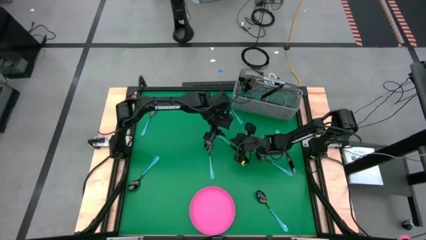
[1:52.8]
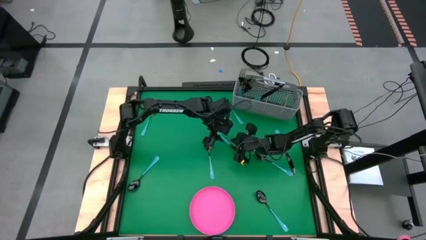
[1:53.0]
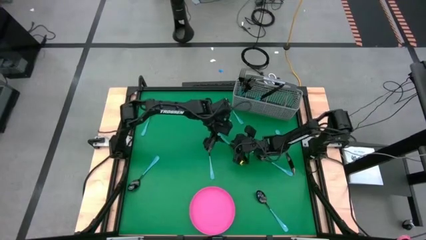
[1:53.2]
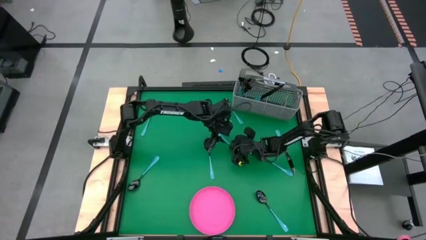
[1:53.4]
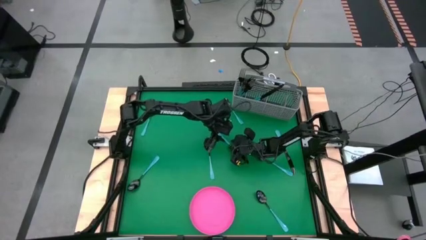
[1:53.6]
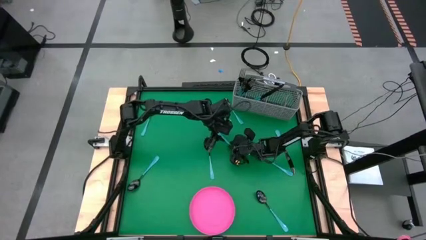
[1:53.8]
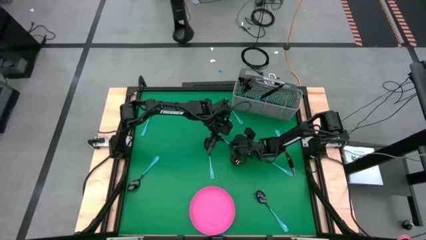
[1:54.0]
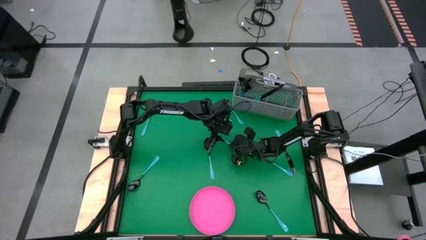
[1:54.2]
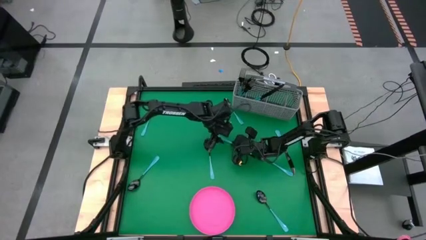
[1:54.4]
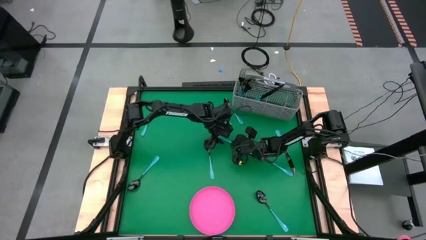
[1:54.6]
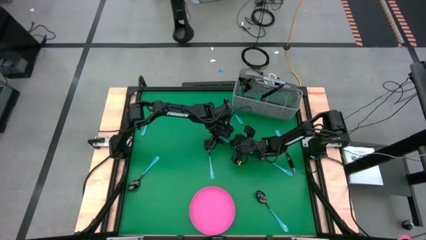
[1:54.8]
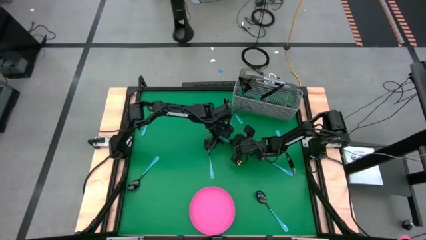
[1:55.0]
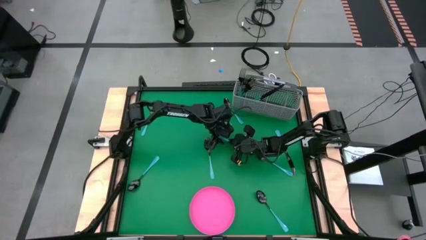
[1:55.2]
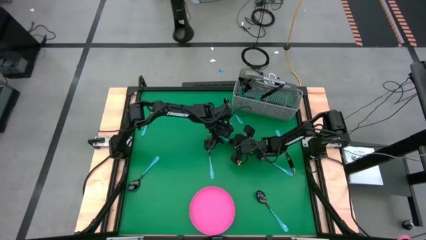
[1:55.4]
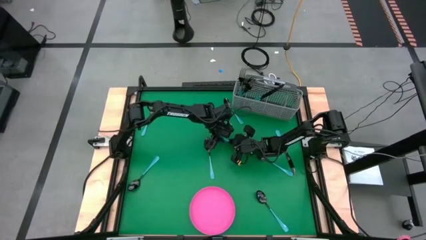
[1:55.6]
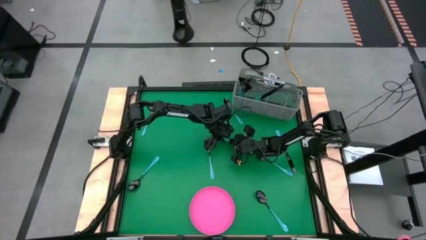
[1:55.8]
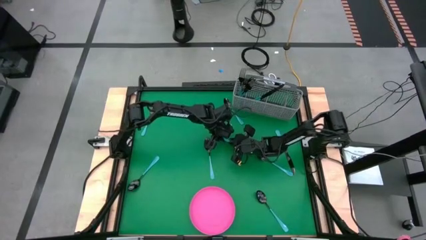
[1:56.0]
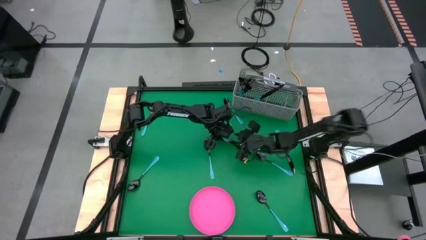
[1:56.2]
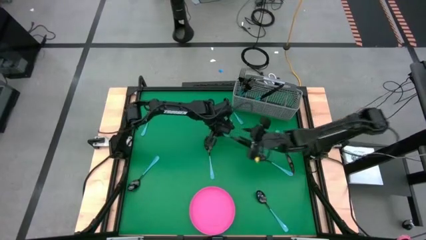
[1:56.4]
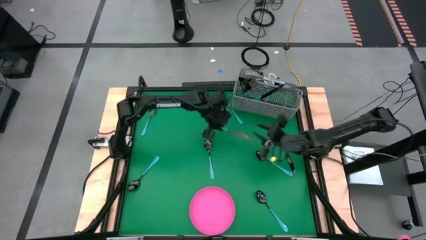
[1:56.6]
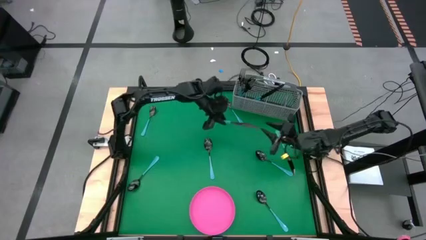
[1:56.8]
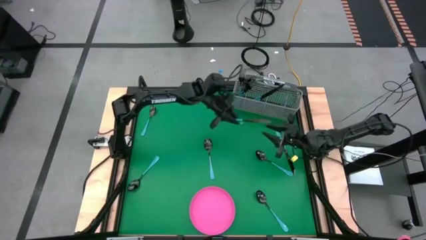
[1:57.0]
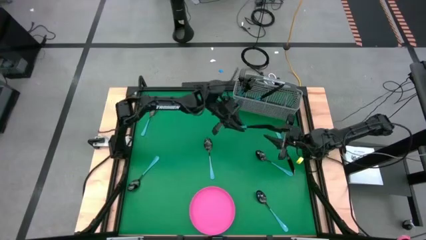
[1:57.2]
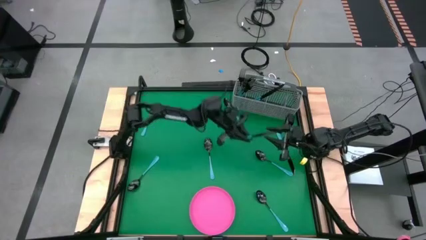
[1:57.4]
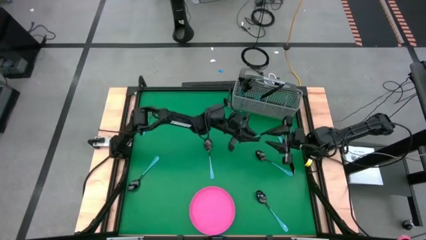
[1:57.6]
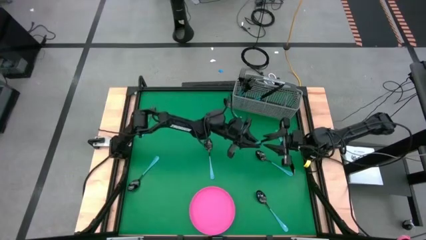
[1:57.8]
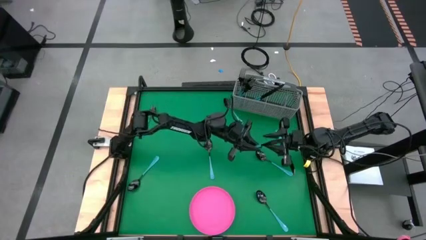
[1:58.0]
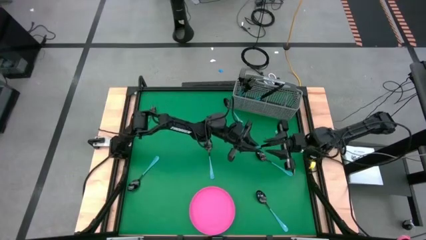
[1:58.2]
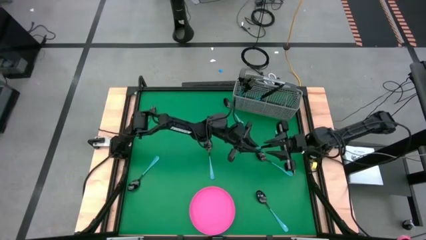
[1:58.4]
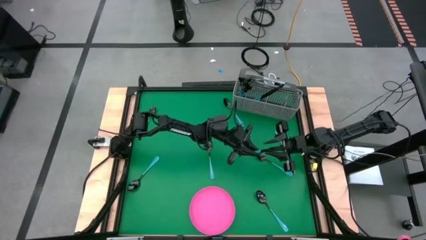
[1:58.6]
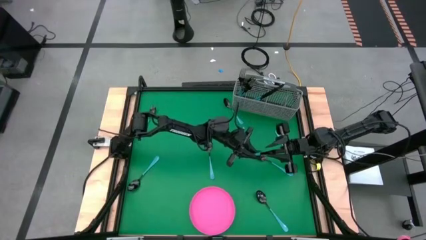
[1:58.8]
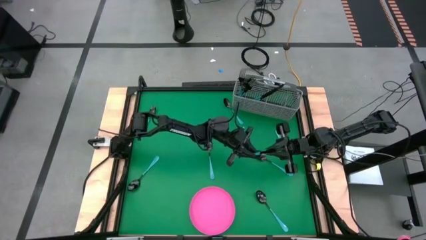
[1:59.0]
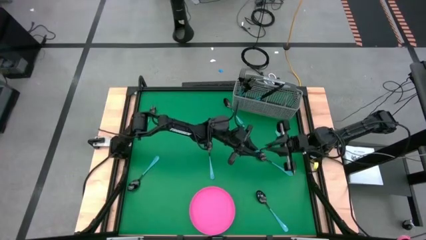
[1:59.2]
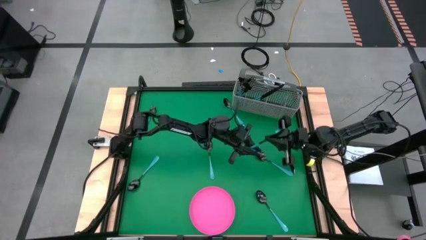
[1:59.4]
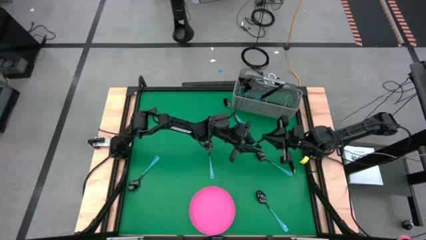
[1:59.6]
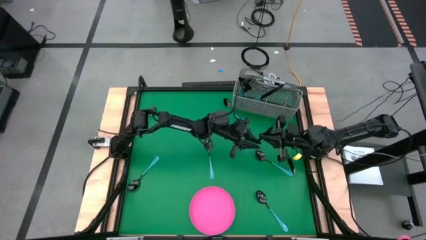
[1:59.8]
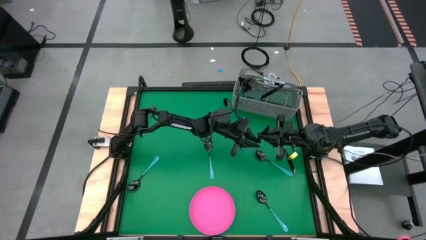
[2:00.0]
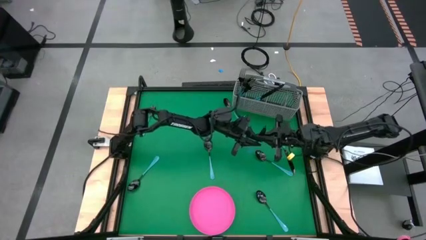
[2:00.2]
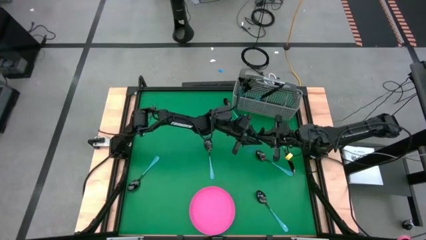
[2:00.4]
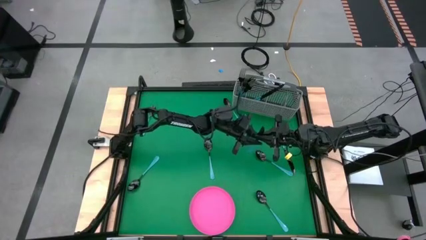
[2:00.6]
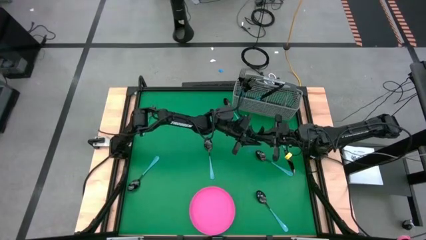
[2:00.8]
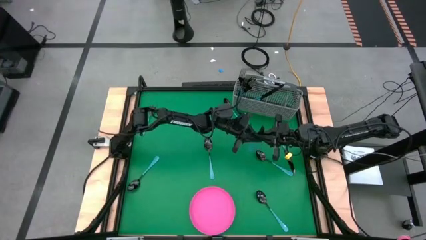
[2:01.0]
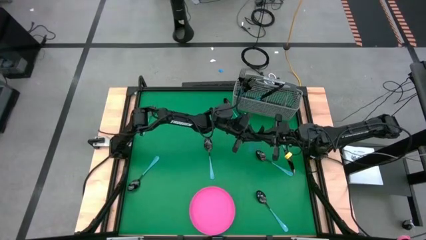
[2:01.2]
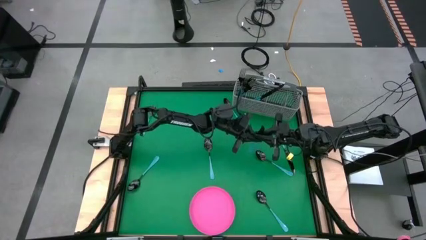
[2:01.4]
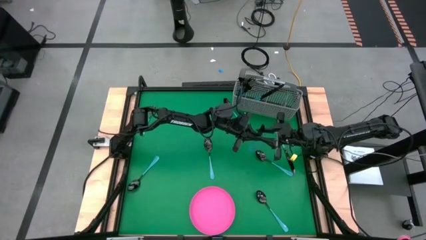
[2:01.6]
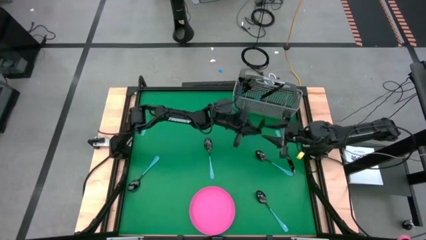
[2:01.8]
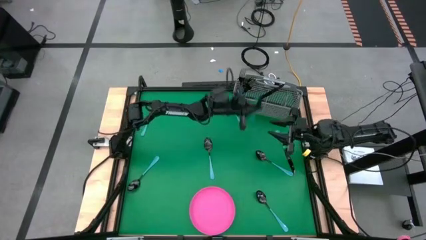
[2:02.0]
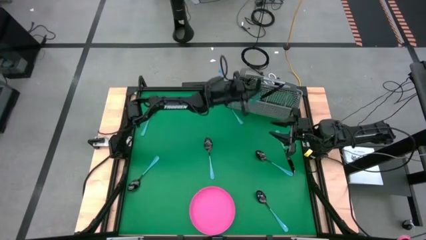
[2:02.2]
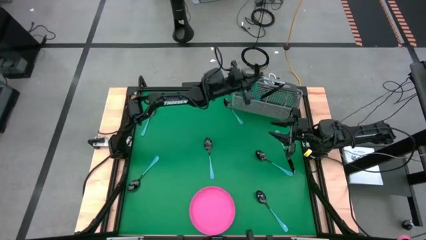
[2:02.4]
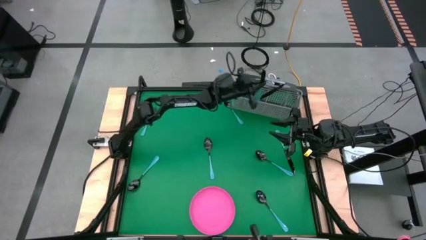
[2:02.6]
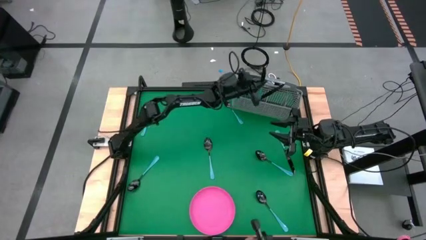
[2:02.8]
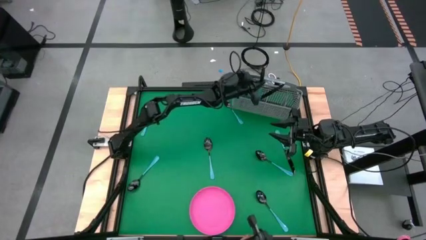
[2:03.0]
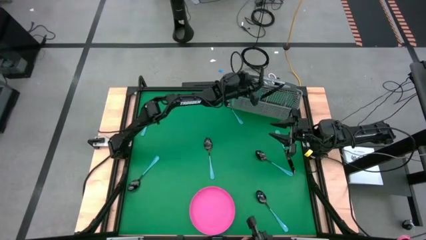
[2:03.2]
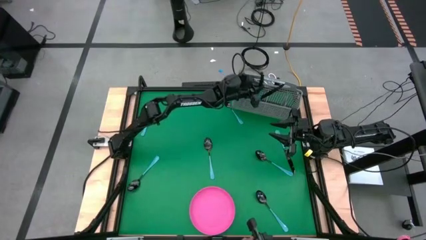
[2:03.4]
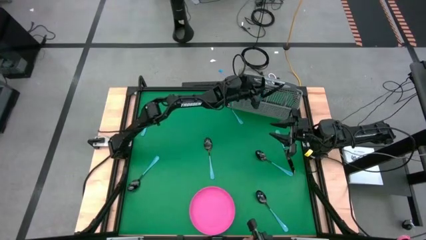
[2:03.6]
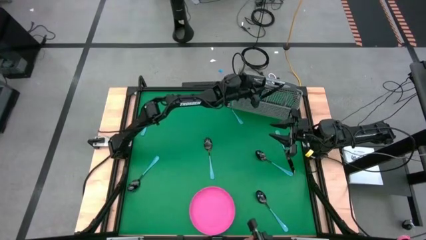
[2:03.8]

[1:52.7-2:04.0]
Task: Sort silverware
Put the blue knife into the utensil holder

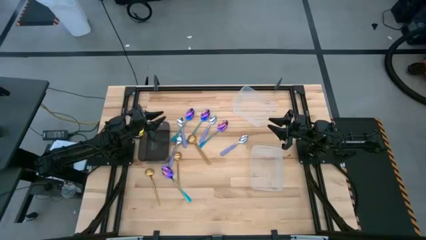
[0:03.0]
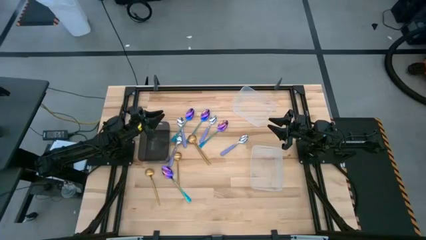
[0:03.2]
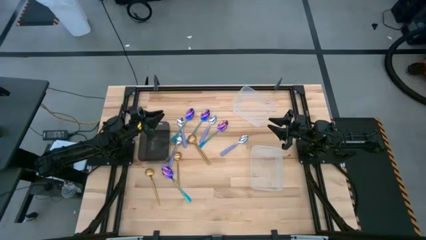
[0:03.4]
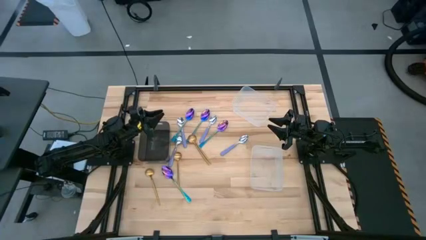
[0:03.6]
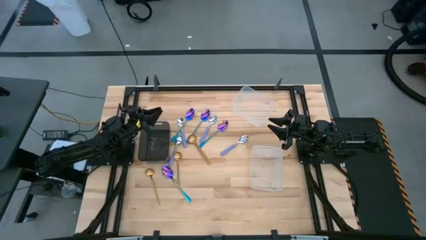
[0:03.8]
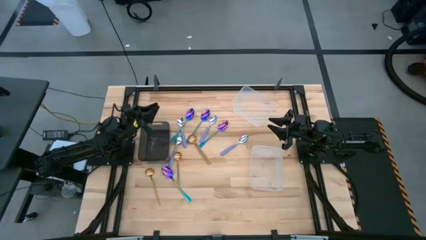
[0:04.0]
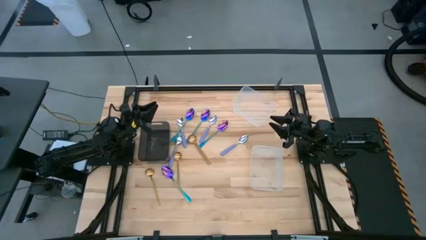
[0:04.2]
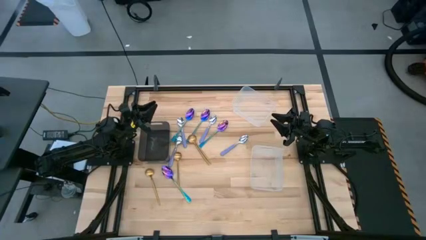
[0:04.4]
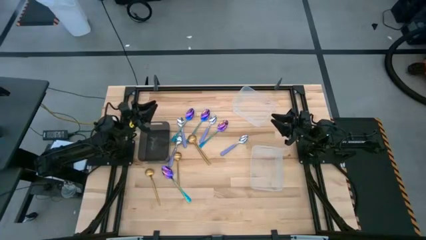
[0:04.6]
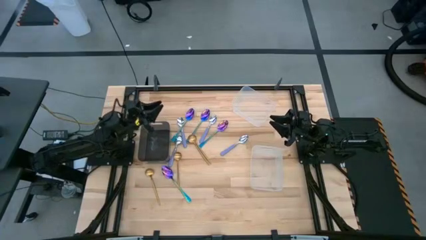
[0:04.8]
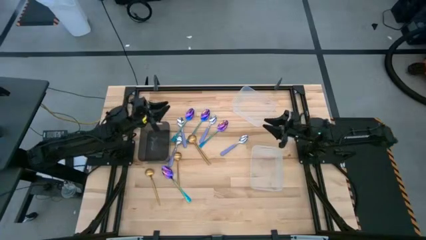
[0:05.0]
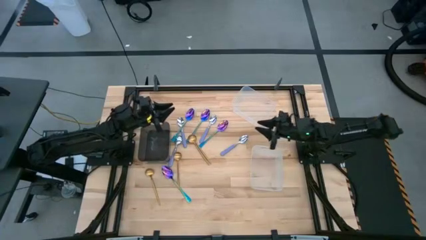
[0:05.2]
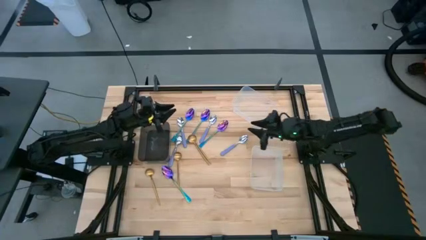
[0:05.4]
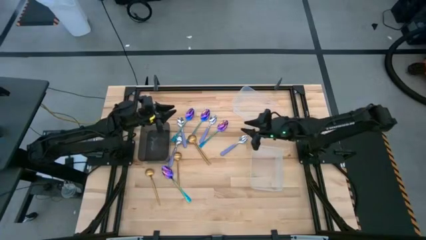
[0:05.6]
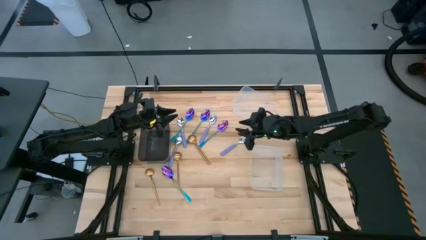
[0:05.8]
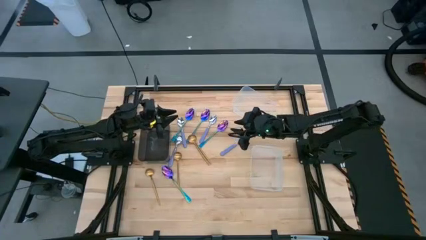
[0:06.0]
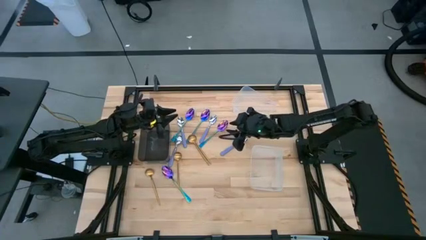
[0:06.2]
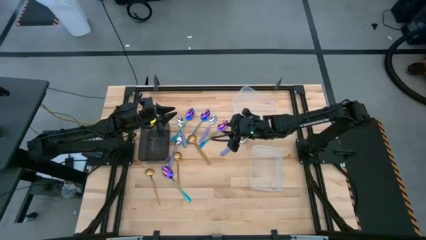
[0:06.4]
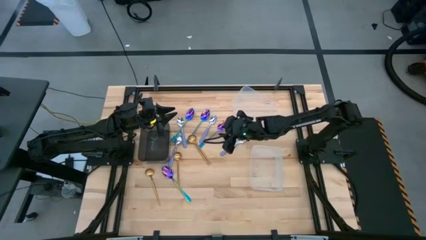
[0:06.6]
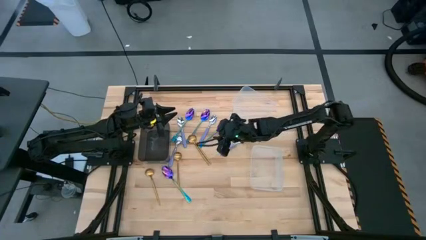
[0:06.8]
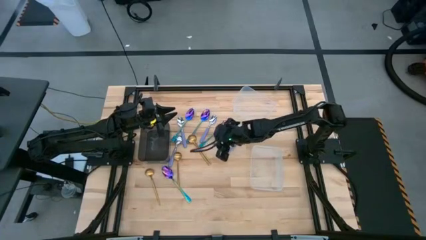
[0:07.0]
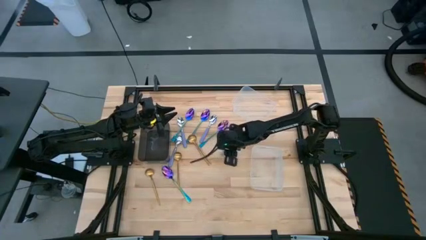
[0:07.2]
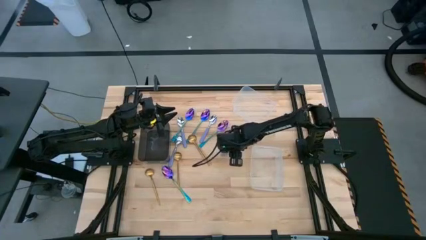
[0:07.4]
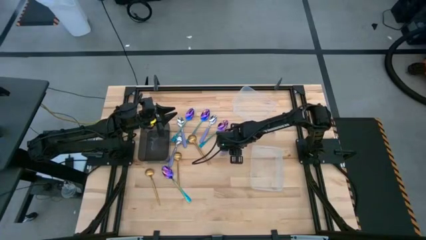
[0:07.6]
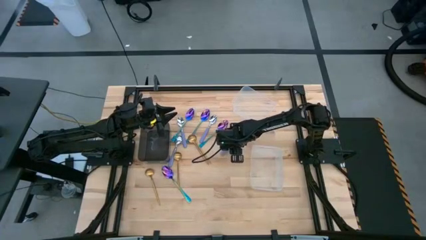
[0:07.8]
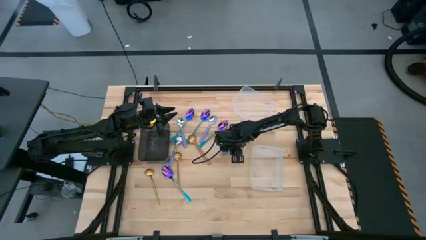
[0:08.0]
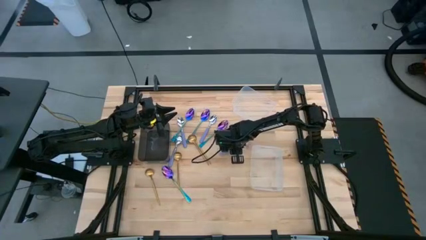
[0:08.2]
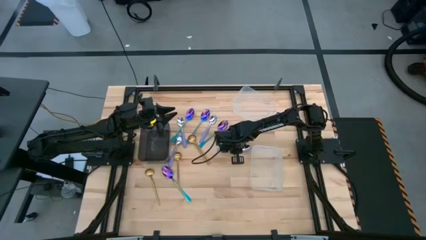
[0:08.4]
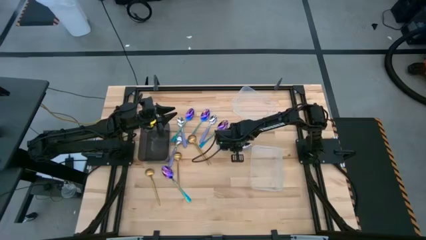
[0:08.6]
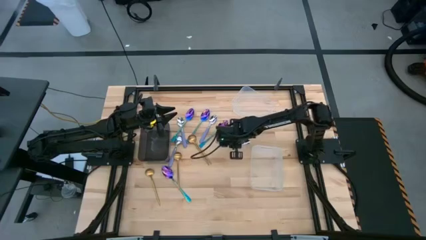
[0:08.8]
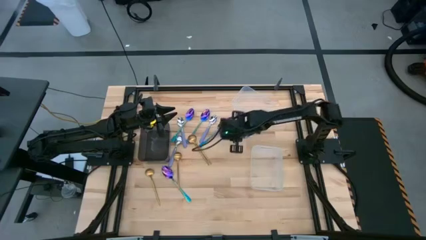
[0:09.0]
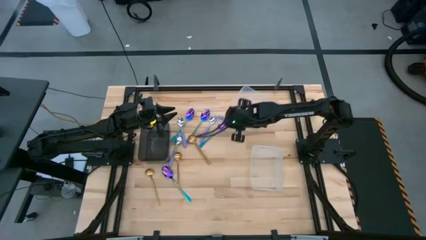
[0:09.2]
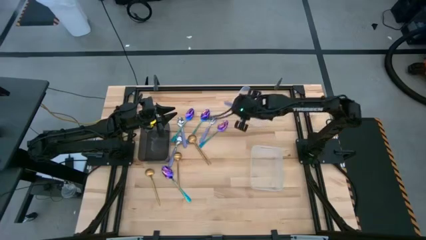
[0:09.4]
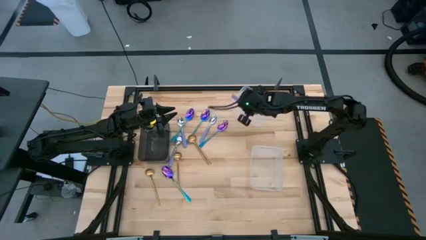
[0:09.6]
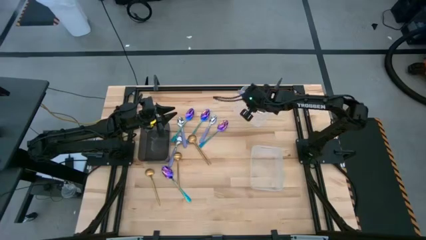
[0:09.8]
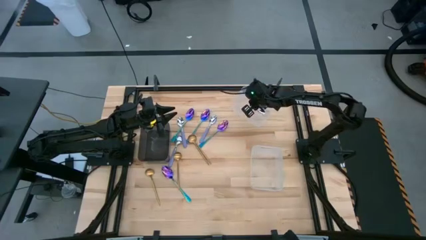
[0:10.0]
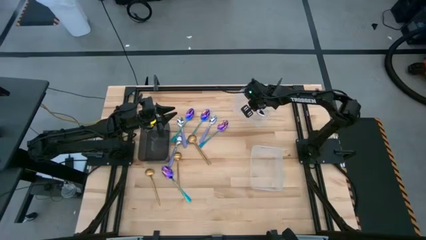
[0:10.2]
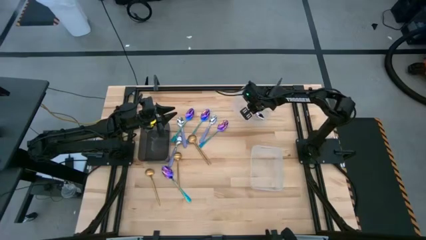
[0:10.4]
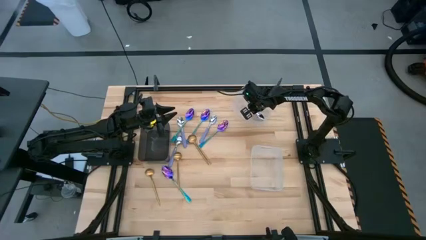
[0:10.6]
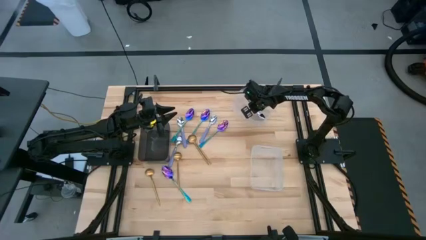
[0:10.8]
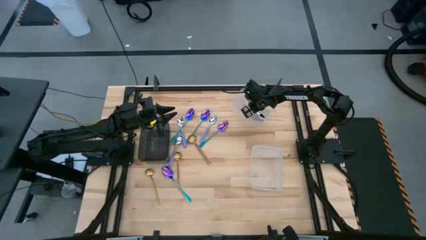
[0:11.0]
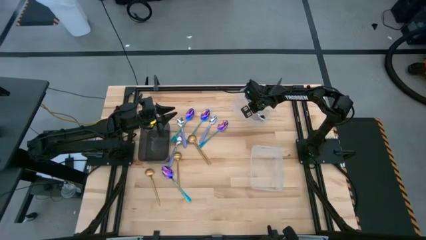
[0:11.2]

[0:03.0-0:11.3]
Task: Sort silverware by color (type)
Put the purple spoon into the top transparent bin
